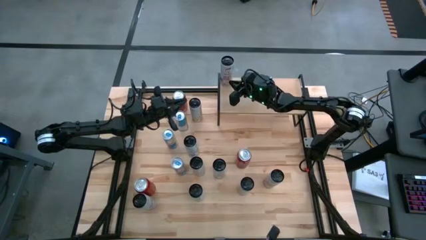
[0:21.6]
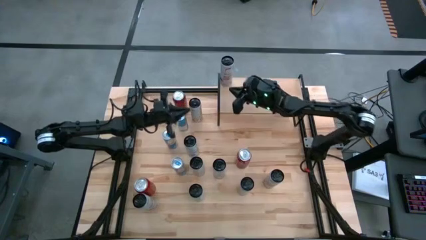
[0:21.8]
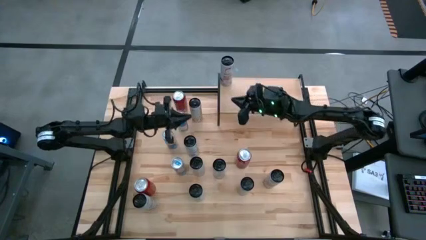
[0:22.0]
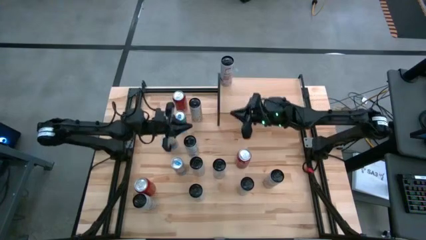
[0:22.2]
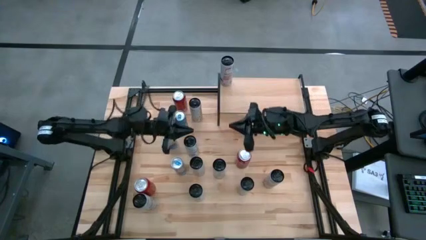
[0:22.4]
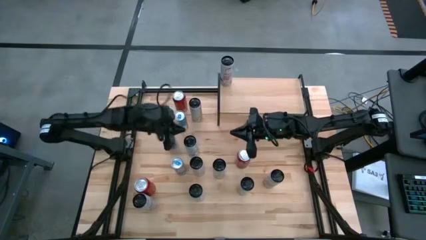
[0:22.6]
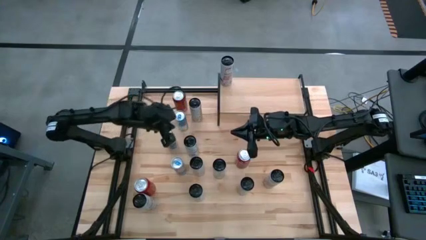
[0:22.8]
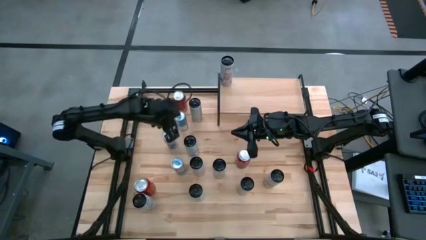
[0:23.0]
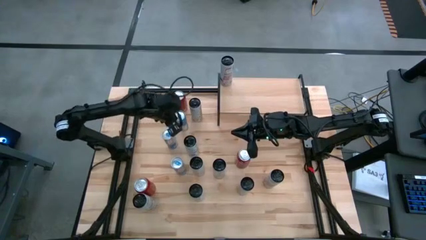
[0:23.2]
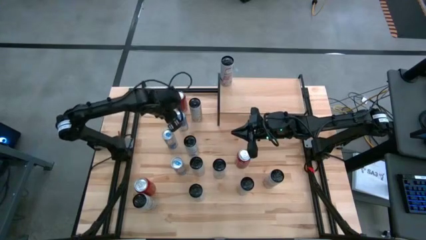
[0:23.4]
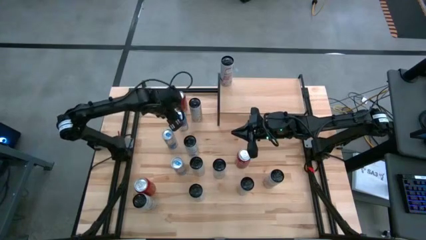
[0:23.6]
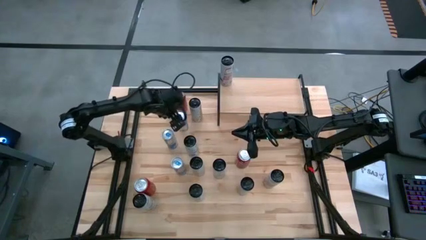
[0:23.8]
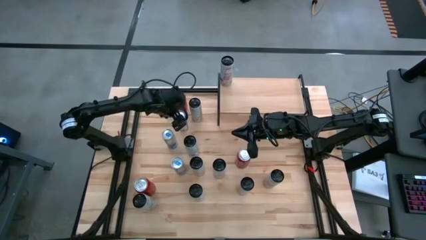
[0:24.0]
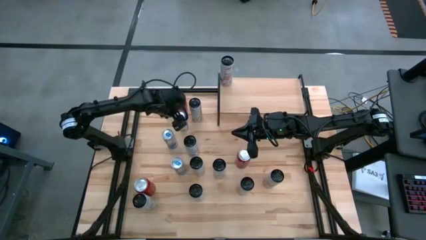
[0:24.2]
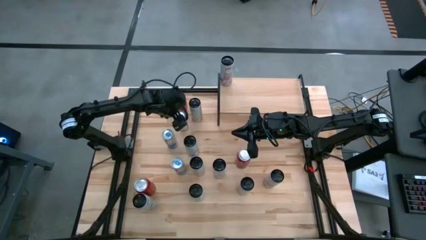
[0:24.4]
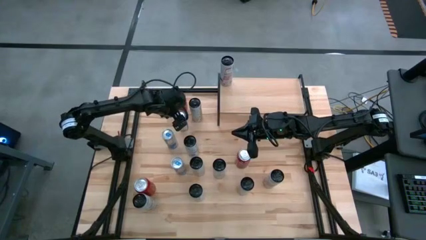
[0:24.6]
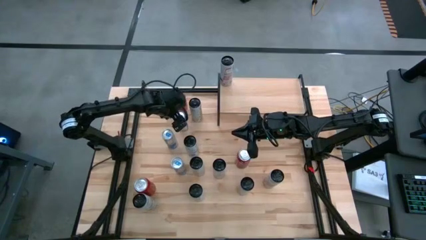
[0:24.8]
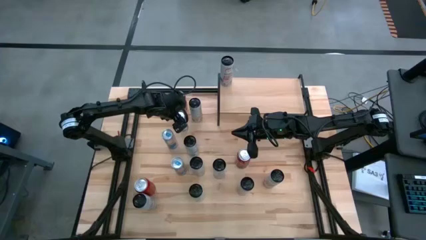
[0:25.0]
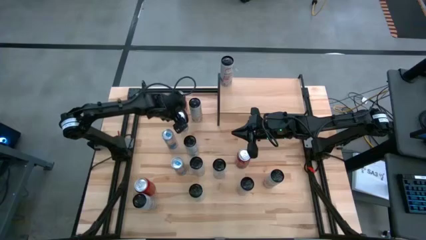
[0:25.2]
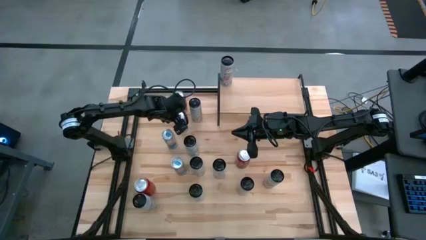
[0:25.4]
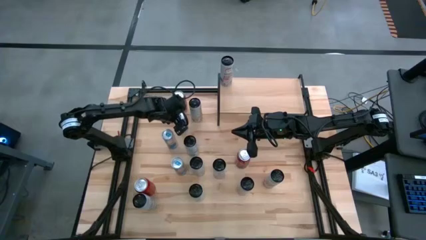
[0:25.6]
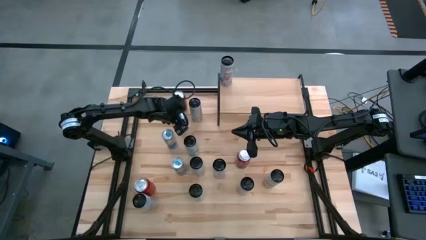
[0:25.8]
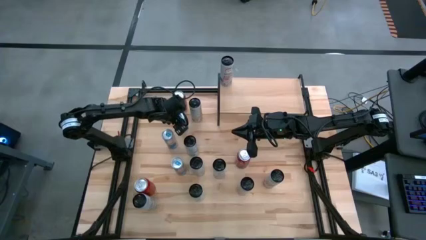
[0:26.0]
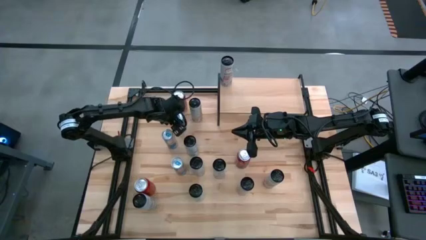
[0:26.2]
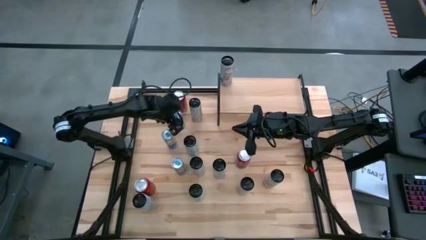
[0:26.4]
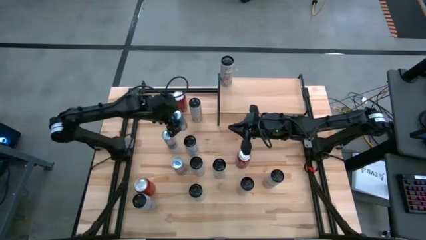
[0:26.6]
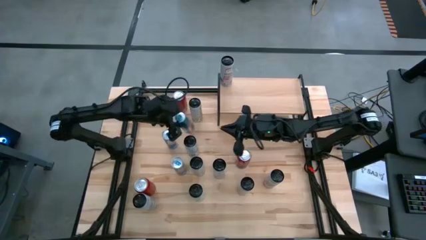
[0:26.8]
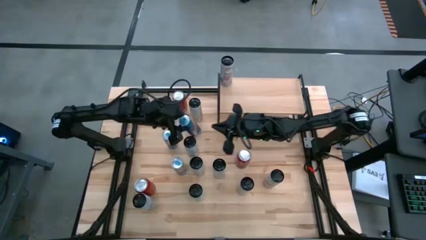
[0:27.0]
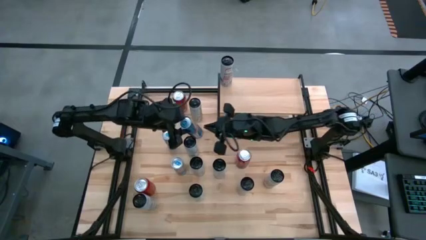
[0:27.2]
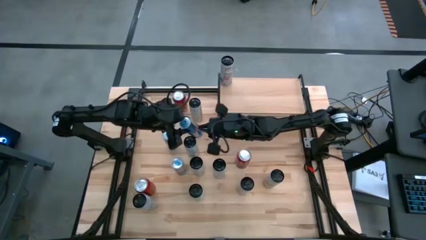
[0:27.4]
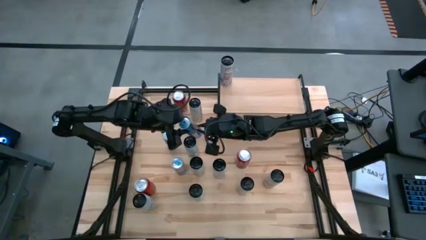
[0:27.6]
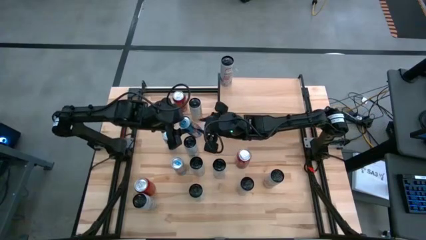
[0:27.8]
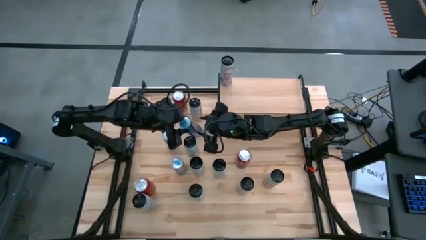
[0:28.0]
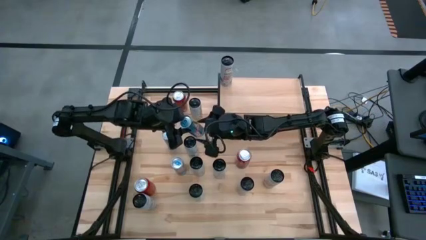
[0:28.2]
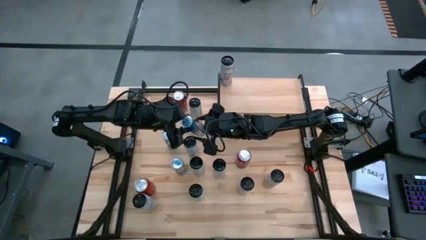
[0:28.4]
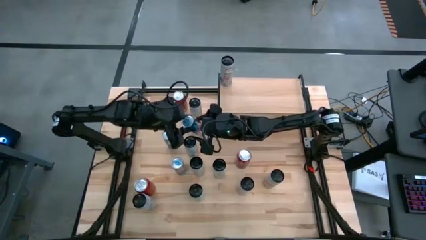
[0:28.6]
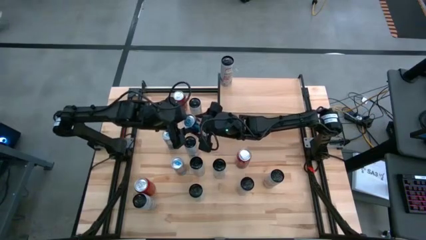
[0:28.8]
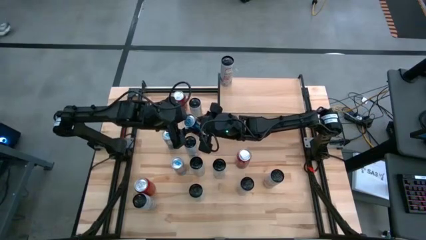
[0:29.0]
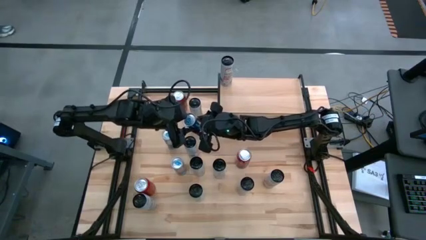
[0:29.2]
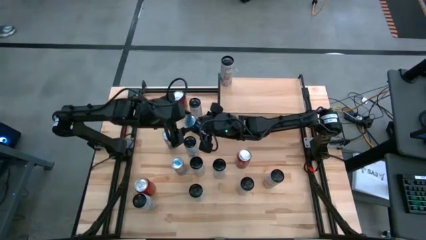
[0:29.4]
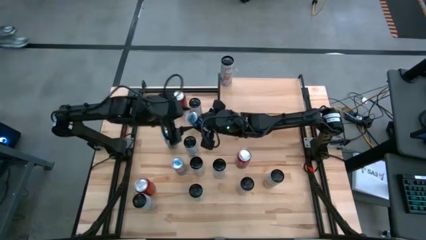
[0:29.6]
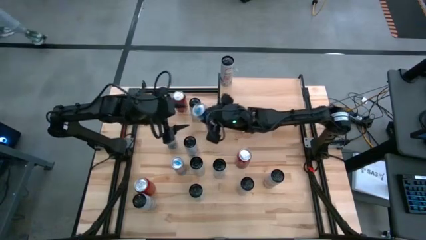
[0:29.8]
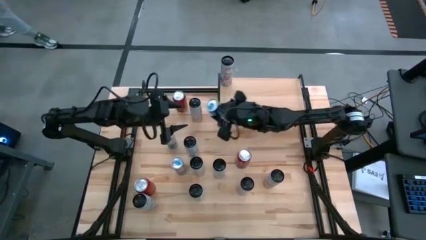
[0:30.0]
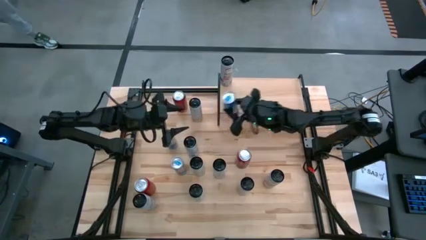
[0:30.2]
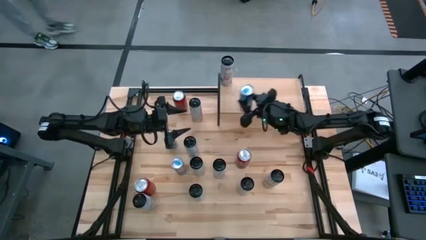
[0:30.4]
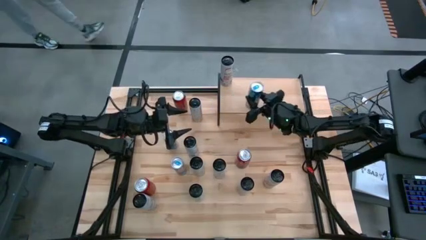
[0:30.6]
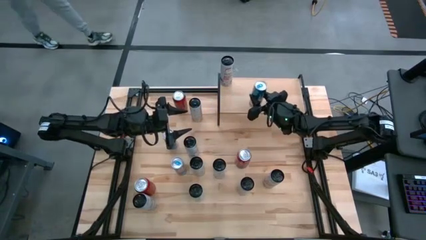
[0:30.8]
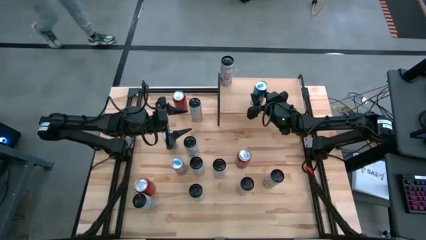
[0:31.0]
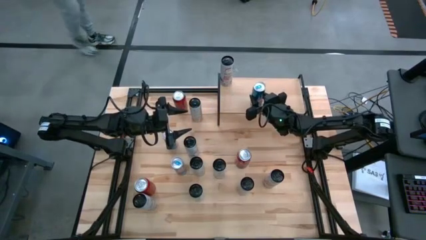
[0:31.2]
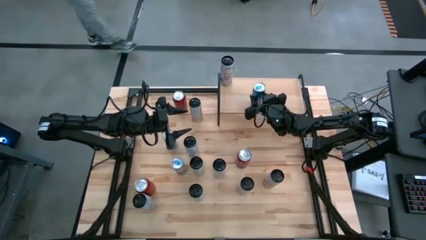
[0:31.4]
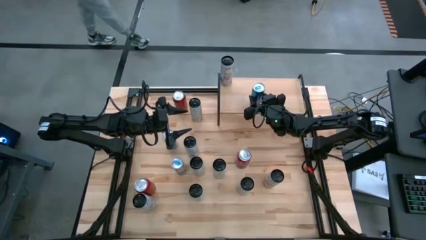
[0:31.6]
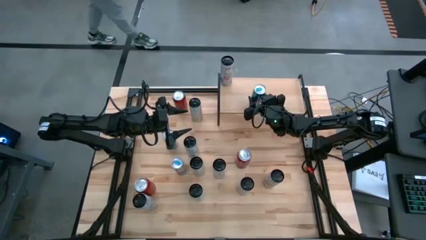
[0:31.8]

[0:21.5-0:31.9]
Task: Place canned beverage on shelf
Put the top blue soda can on the shelf
